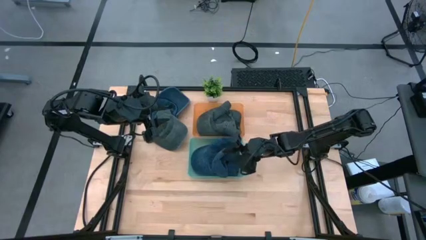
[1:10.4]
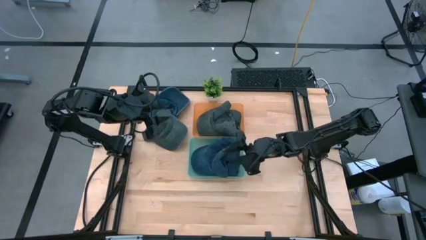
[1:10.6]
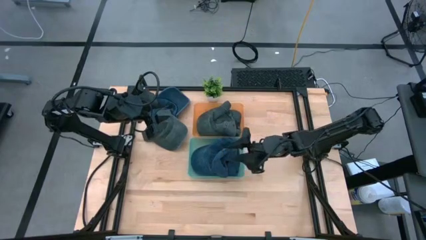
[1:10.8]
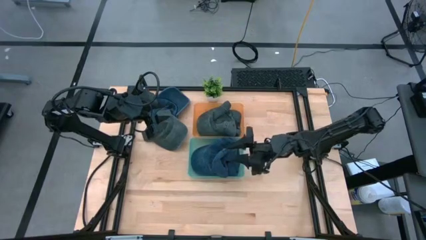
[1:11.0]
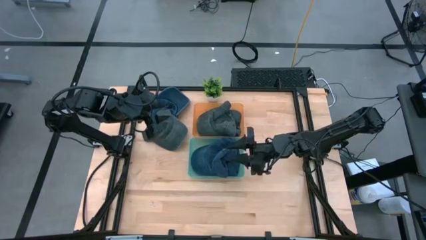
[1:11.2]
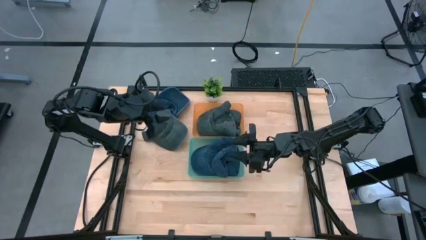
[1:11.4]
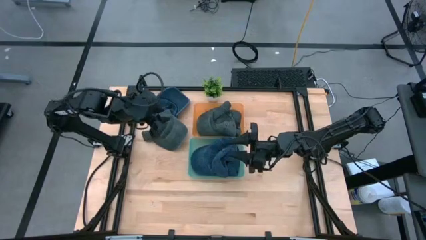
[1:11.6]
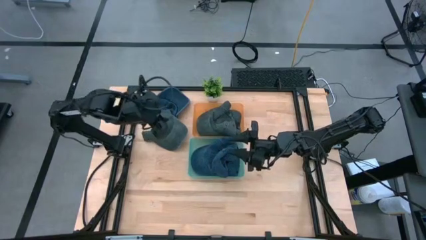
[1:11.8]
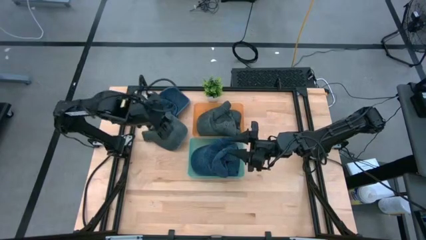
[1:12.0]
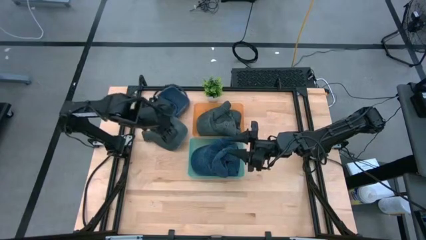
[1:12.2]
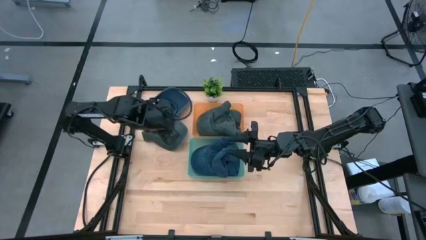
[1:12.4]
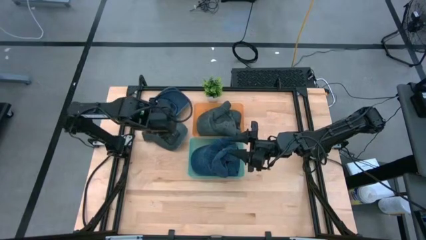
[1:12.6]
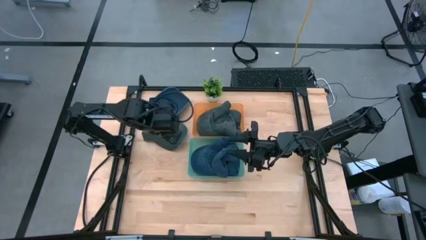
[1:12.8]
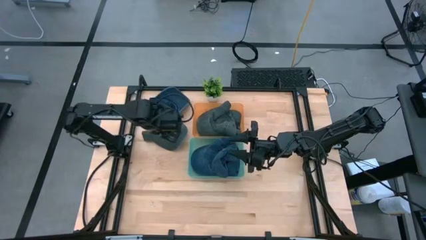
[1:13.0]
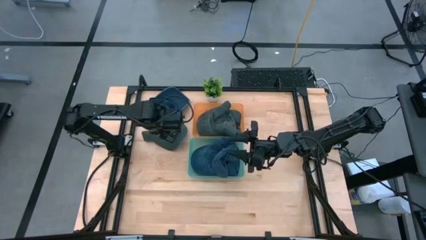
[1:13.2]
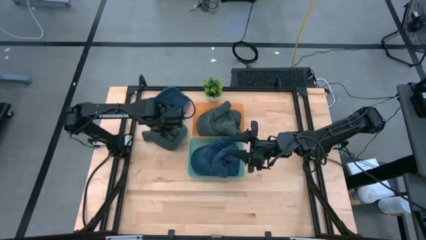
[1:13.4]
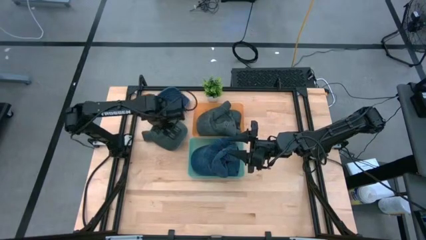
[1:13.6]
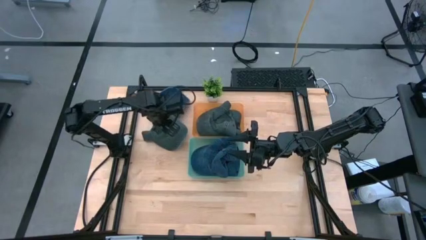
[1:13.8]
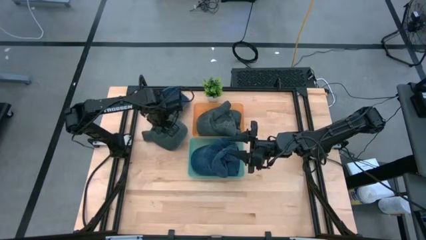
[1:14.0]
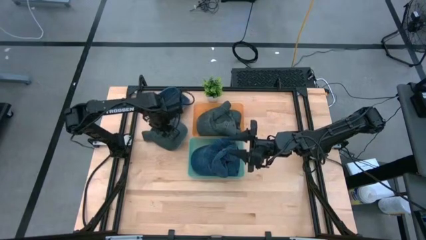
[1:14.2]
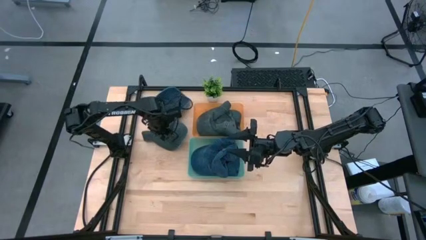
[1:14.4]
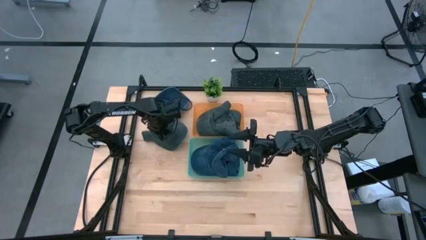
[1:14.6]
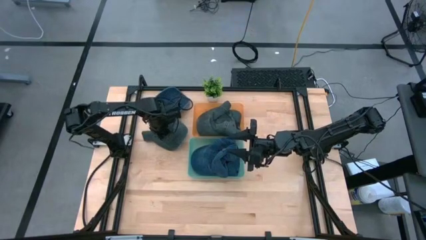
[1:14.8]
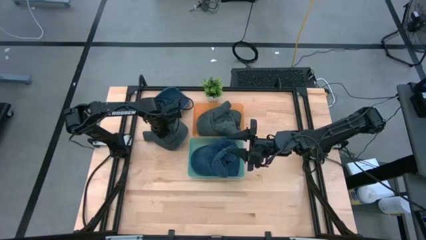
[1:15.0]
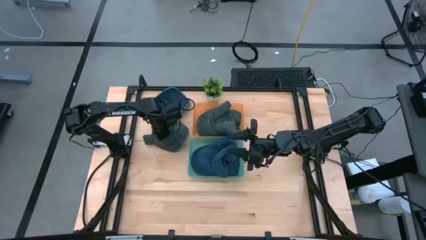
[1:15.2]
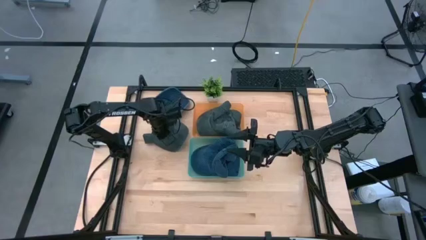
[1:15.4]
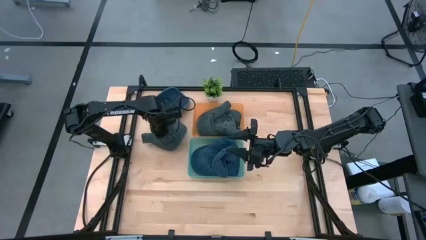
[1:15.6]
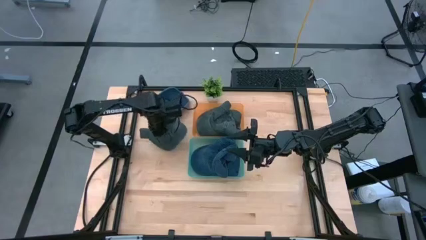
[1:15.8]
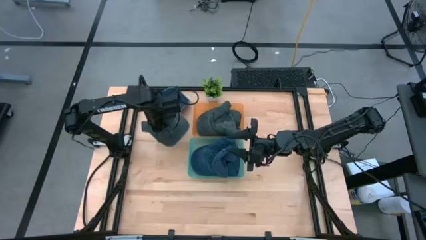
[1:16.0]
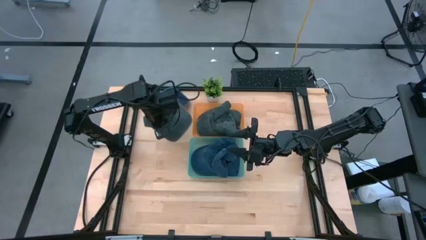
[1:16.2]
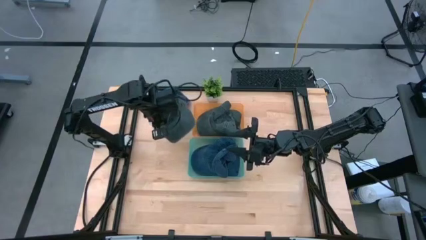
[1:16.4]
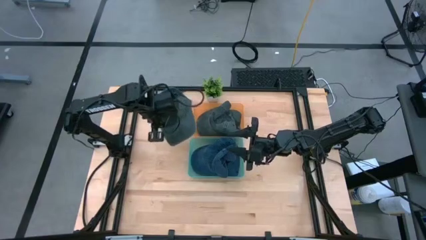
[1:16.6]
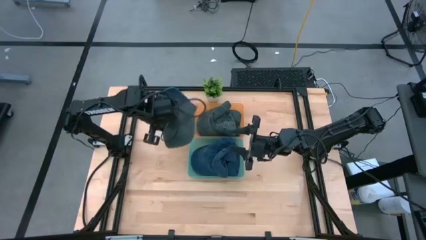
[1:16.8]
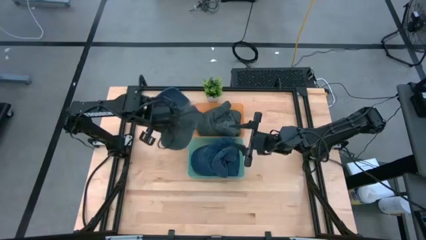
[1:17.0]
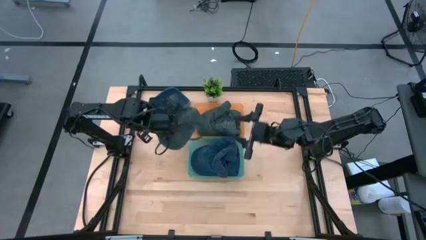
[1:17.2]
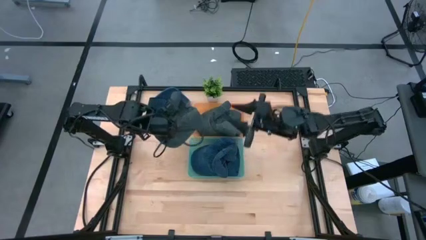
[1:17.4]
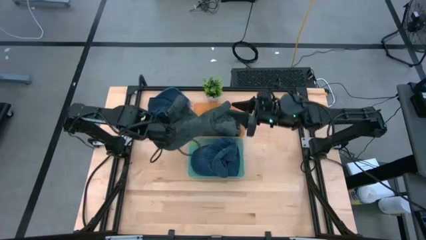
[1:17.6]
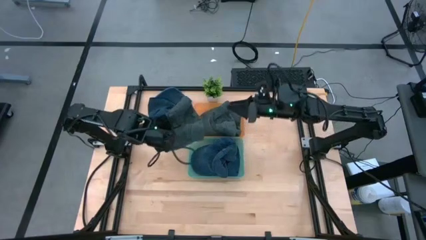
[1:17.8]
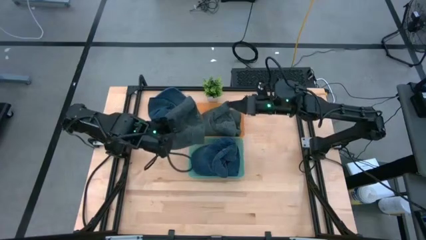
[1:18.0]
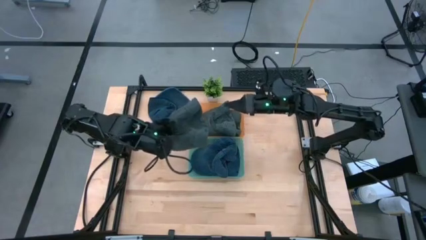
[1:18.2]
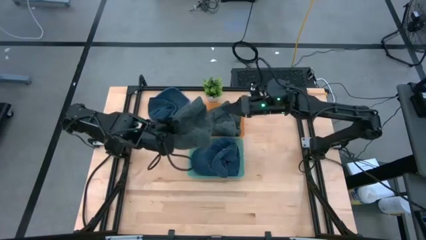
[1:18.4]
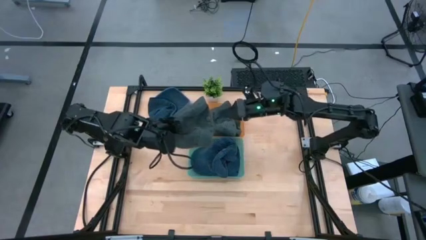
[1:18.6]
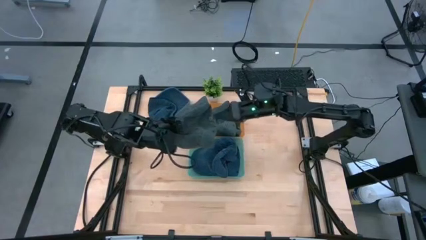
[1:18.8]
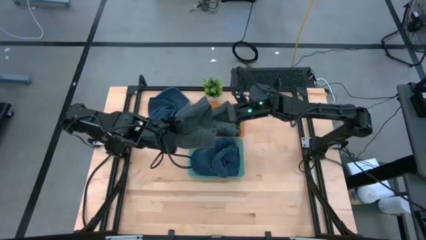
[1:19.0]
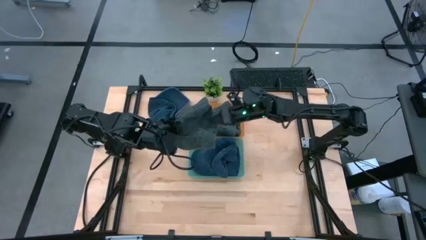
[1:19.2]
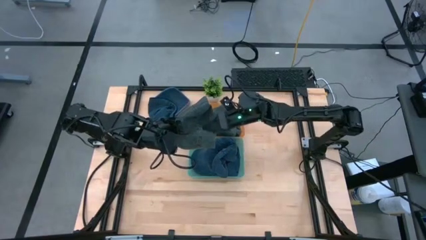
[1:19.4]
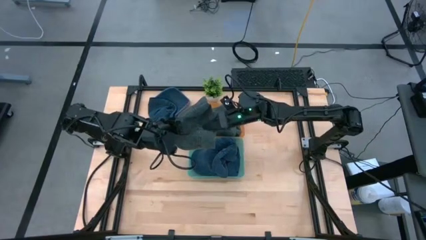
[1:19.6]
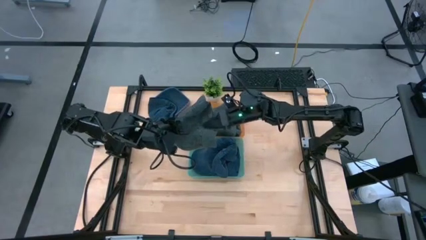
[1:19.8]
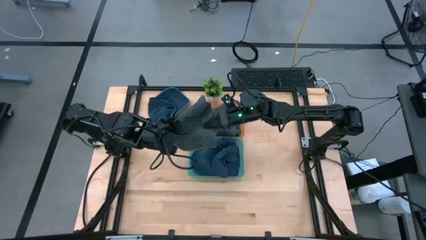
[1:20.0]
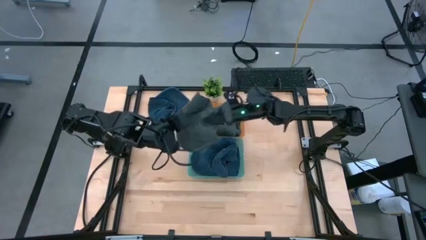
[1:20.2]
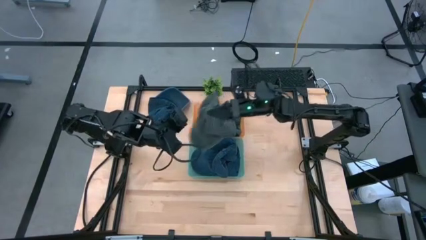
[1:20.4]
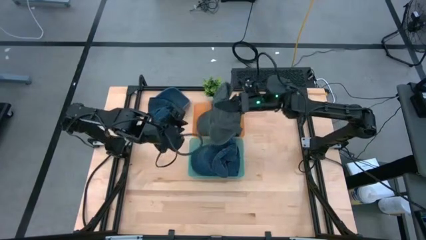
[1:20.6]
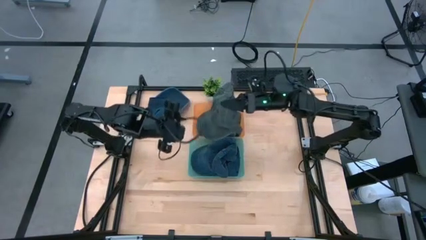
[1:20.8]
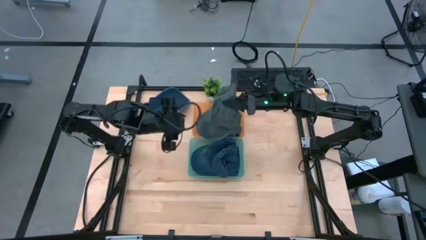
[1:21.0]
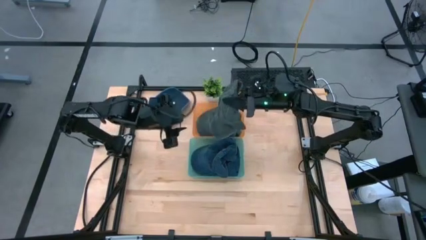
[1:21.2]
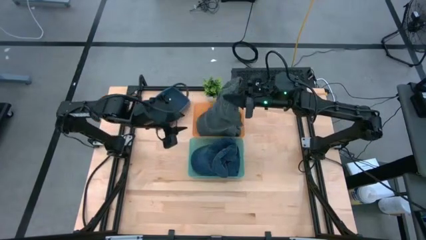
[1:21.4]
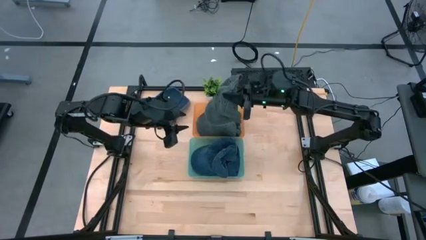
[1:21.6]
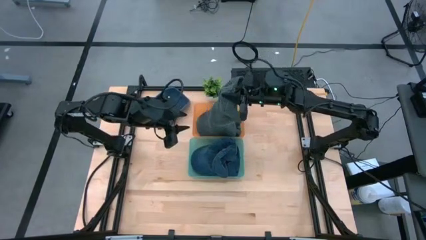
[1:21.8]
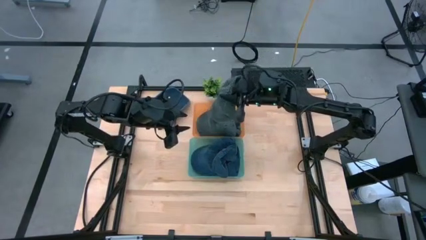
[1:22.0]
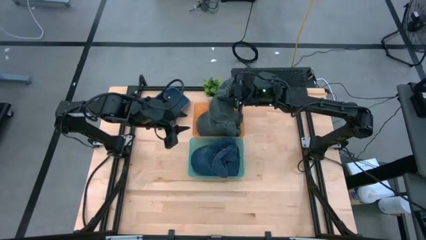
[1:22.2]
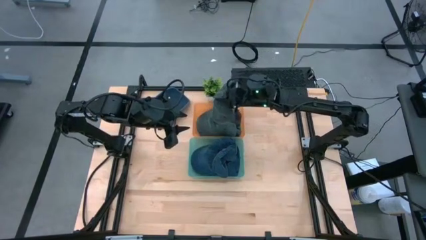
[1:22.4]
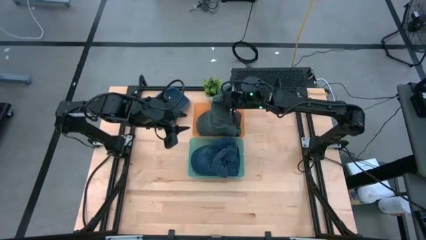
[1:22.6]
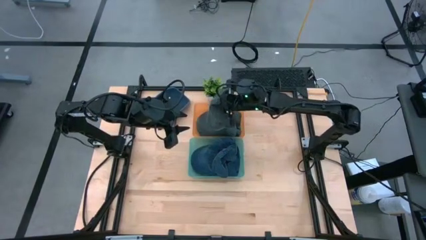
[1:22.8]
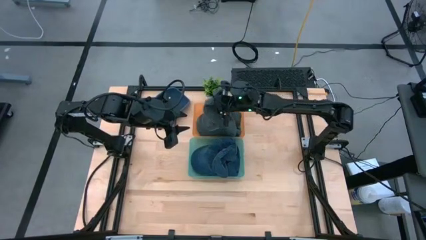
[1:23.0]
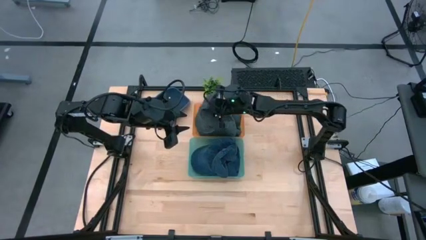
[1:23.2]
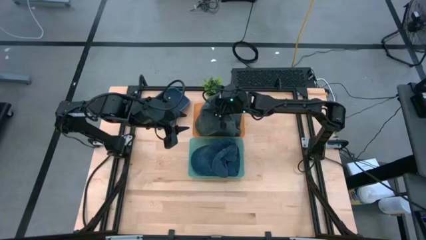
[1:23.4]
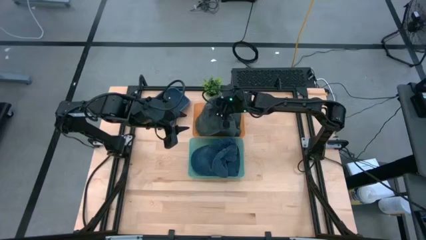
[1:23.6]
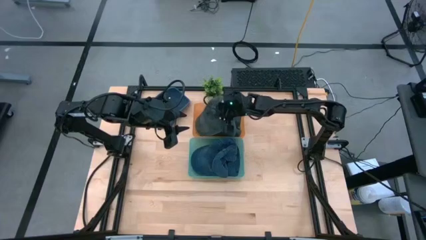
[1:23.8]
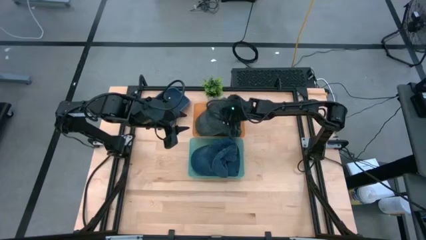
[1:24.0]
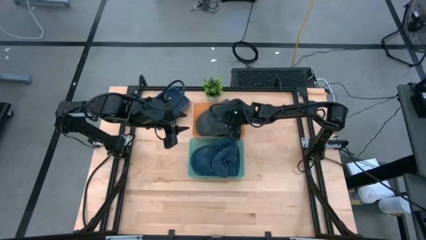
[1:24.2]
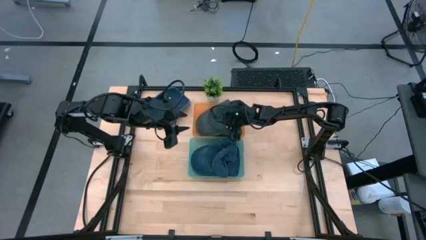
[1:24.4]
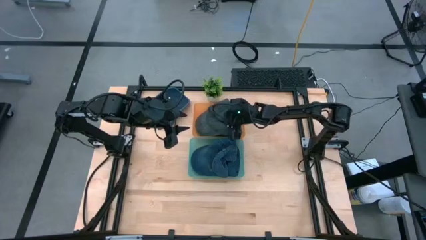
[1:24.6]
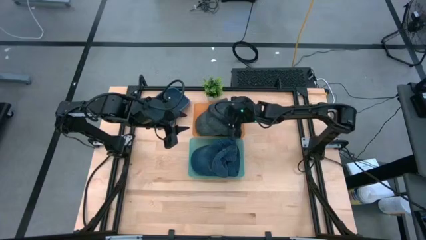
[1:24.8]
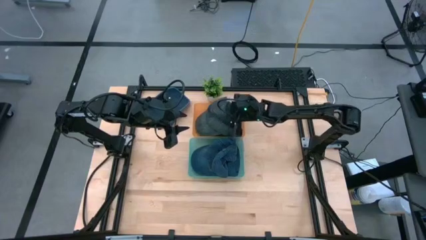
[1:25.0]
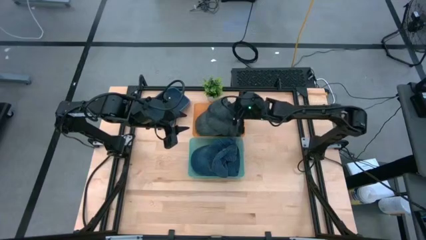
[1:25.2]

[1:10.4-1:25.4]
Task: Pick & Place hat
Put the gray cap into the orange bin
